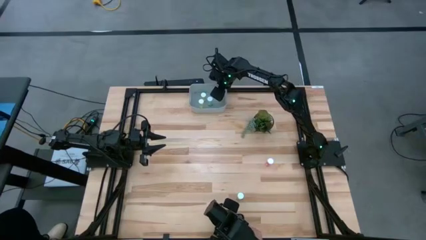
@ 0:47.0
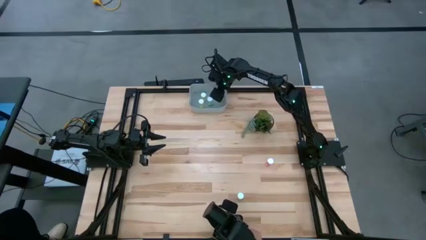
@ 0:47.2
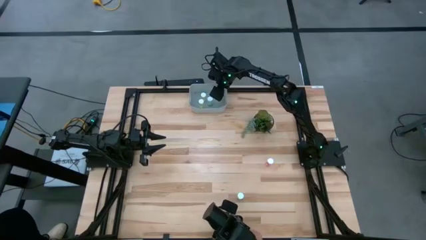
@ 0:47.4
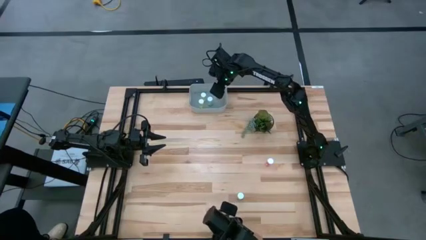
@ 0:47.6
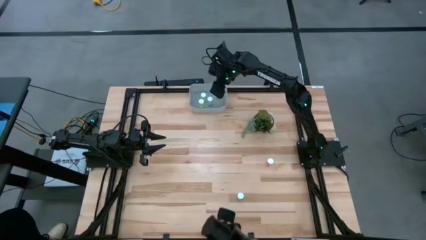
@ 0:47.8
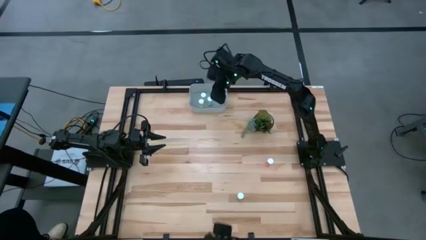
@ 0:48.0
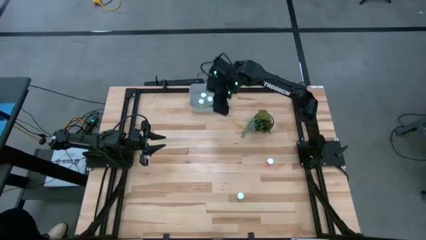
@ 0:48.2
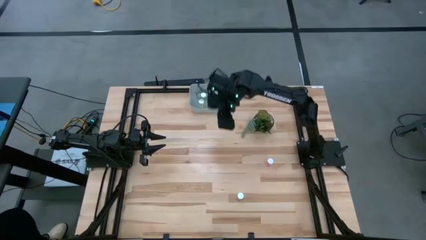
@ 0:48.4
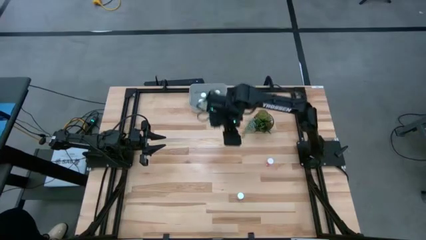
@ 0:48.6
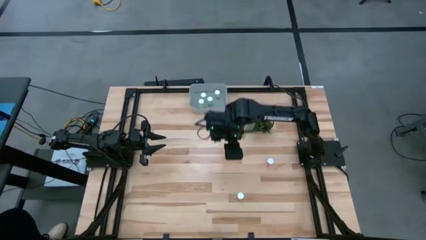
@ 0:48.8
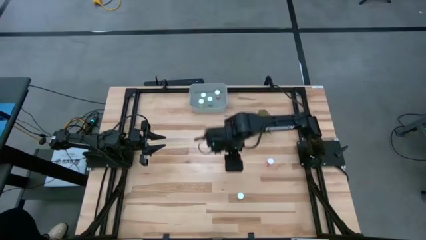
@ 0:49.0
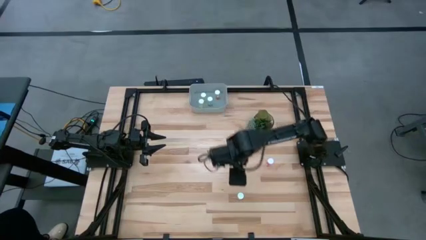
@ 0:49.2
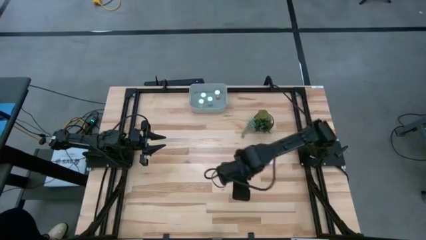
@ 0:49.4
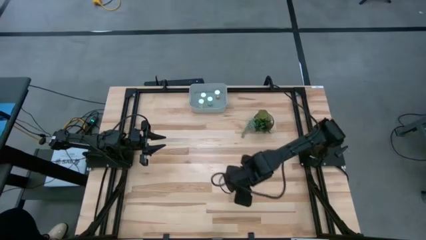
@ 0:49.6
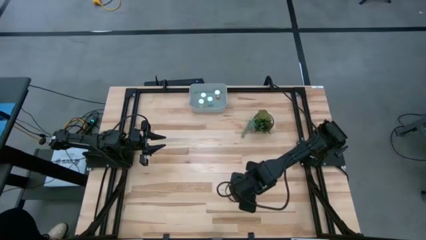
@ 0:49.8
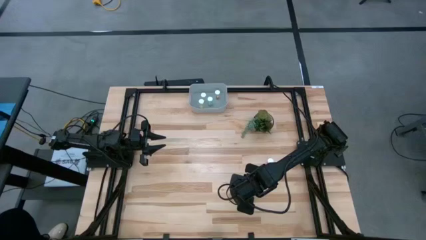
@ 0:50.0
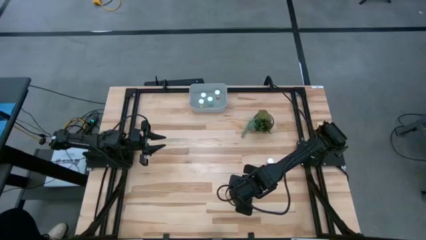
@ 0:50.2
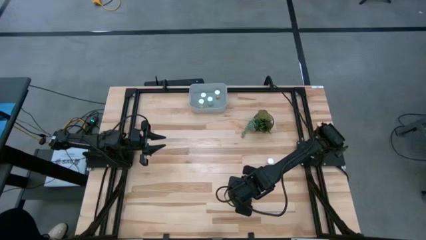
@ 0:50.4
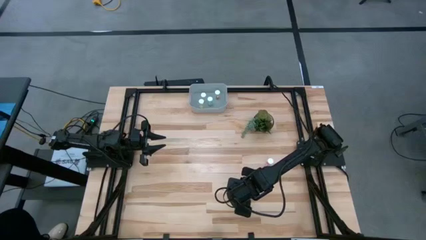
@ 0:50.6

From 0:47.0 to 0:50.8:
Task: Pick and place pill bottles into a basket
Put the blue medicine bottle in the gray bin

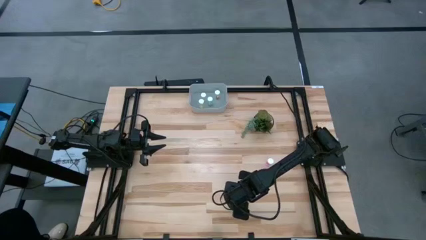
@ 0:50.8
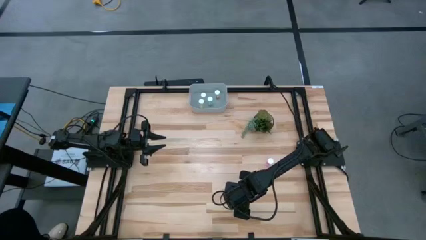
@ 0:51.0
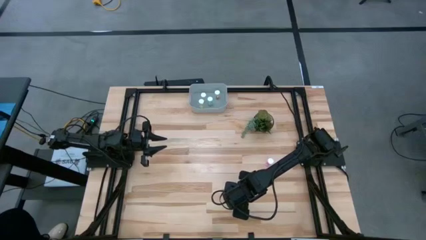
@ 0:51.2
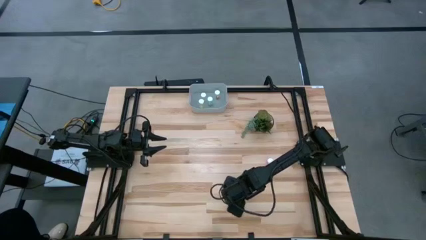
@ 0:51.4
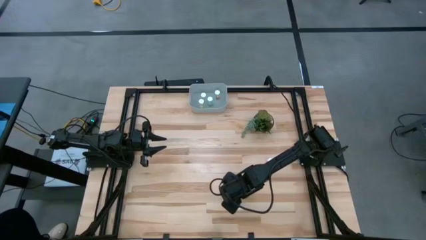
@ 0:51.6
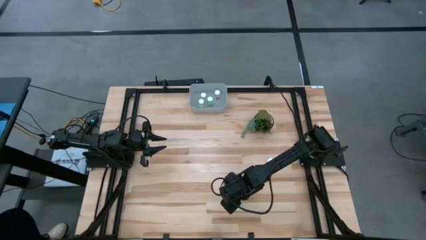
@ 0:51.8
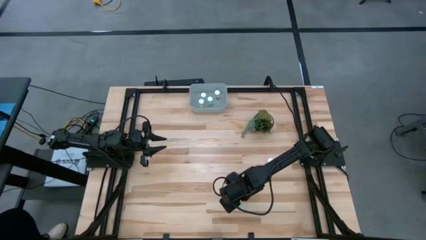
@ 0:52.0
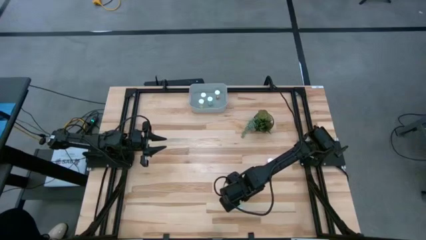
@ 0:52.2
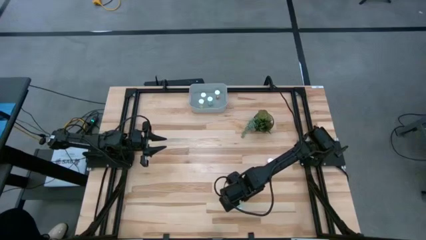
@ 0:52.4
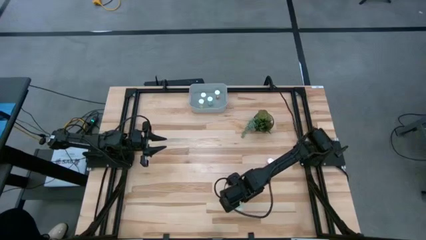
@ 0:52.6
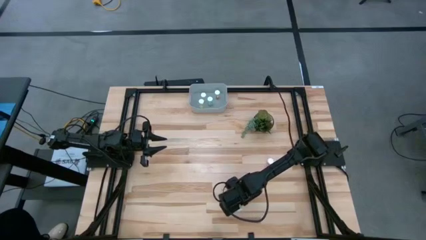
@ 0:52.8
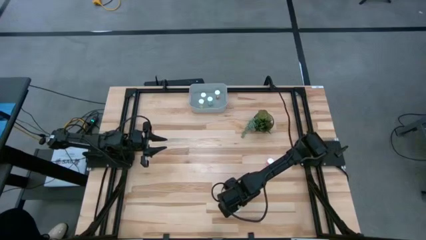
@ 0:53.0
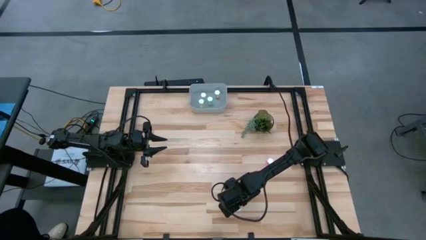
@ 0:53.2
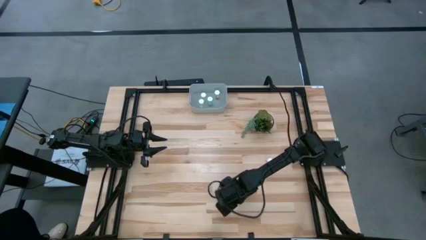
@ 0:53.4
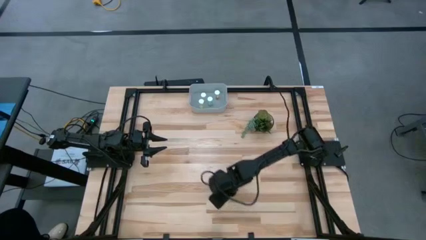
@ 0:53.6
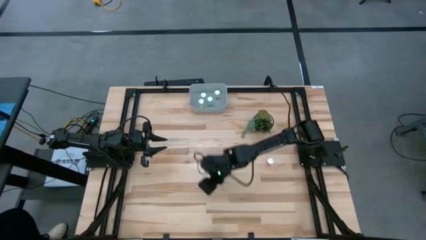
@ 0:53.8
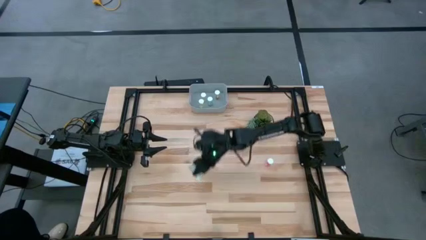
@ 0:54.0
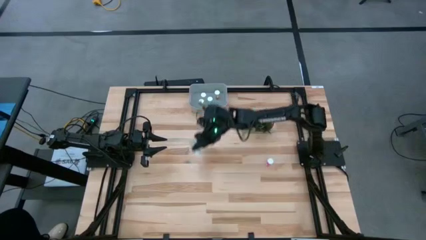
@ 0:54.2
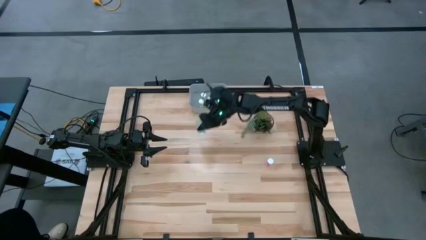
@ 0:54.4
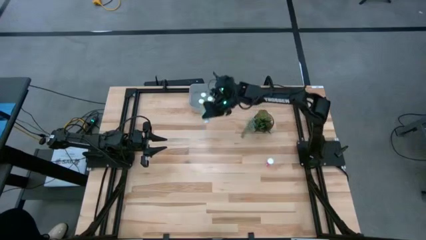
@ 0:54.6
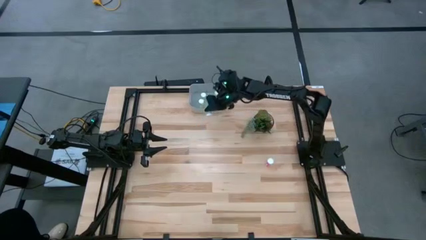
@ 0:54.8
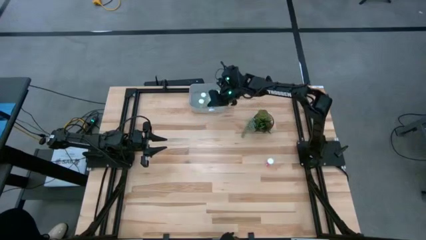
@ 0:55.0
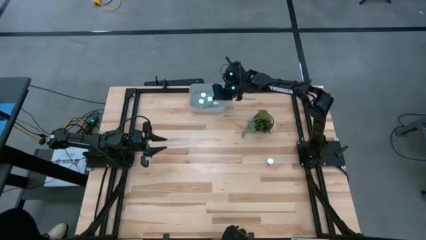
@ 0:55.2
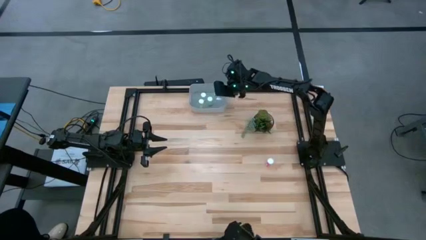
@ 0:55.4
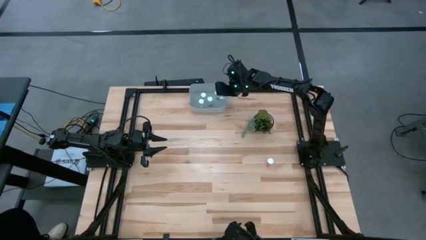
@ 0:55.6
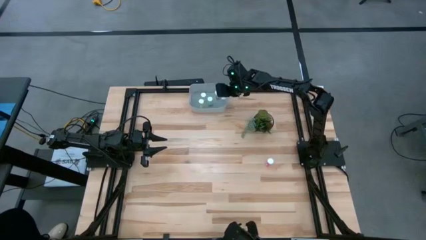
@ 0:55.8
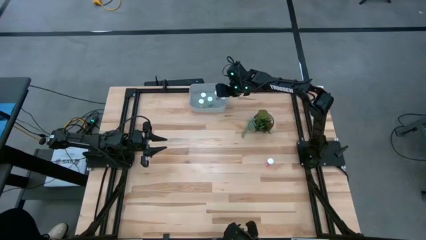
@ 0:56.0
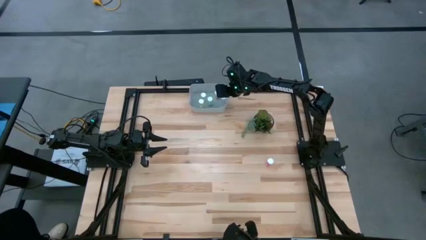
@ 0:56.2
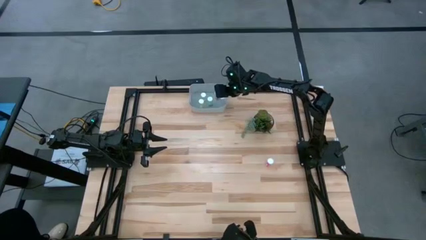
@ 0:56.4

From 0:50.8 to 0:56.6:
Put the blue medicine bottle in the gray bin

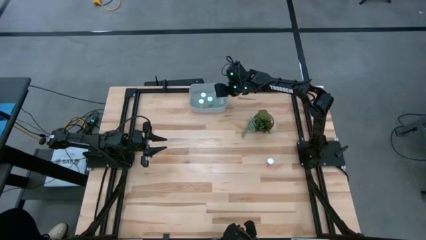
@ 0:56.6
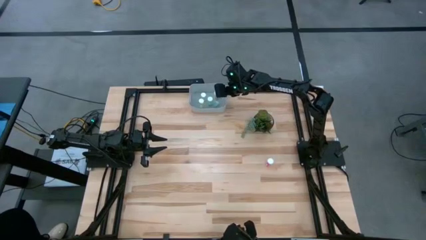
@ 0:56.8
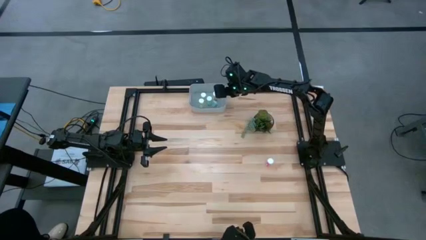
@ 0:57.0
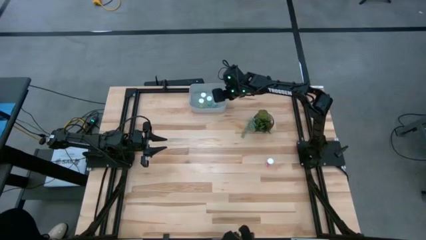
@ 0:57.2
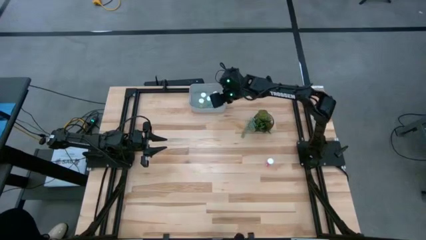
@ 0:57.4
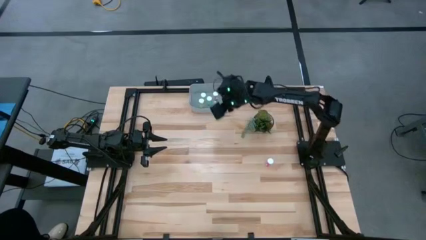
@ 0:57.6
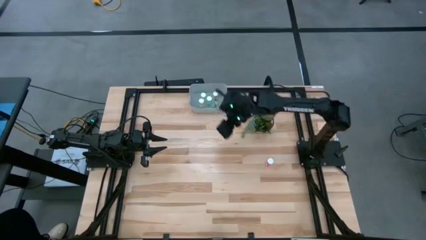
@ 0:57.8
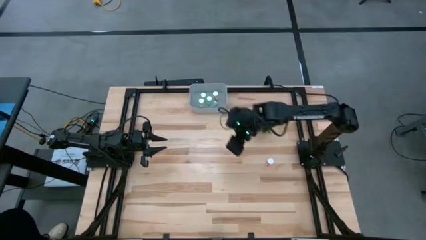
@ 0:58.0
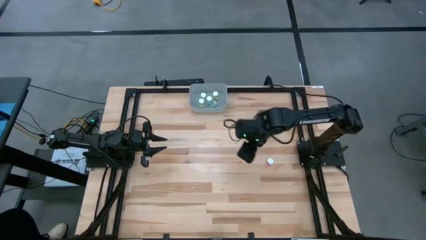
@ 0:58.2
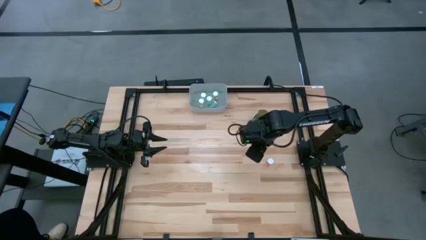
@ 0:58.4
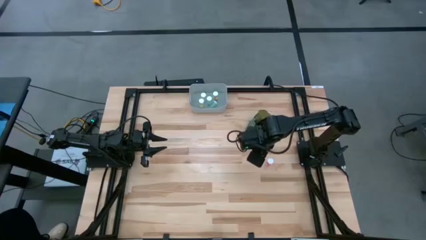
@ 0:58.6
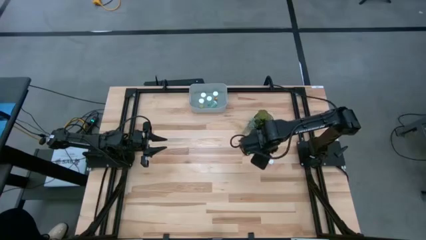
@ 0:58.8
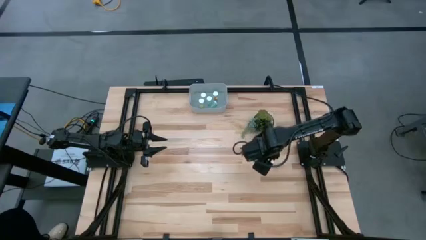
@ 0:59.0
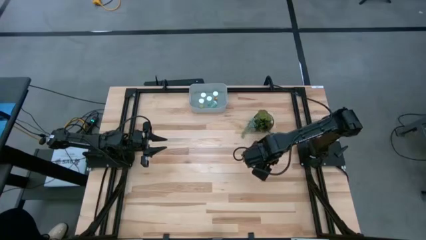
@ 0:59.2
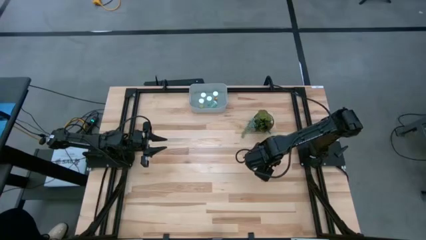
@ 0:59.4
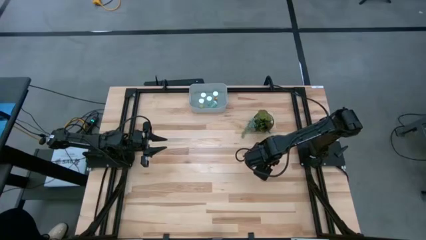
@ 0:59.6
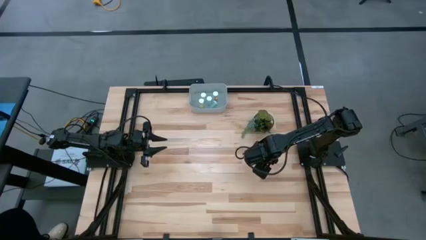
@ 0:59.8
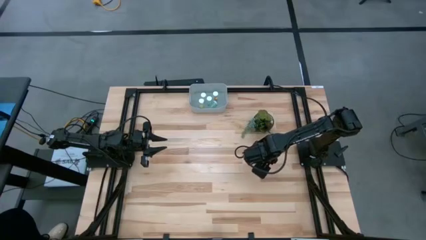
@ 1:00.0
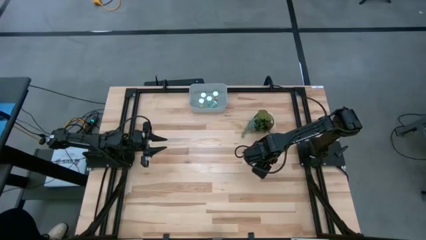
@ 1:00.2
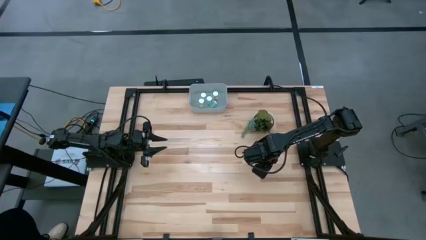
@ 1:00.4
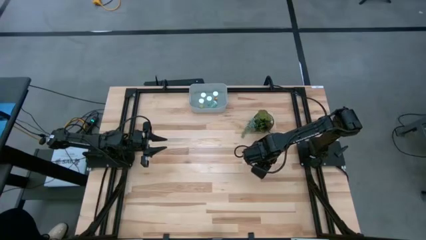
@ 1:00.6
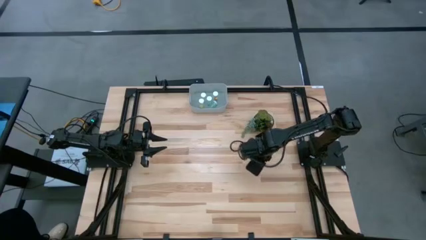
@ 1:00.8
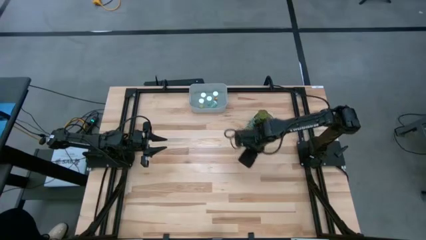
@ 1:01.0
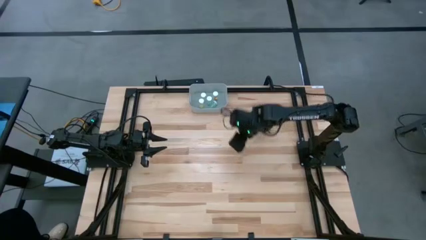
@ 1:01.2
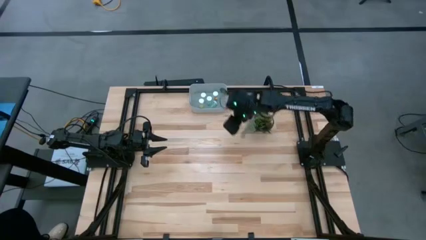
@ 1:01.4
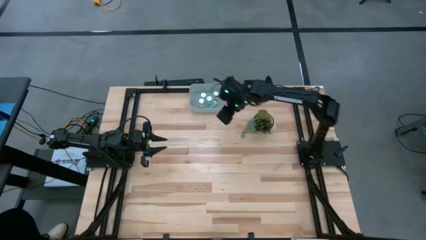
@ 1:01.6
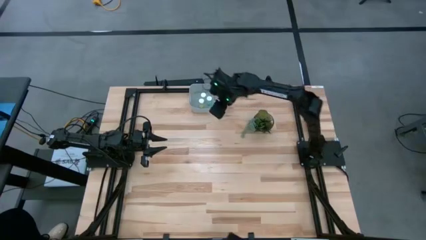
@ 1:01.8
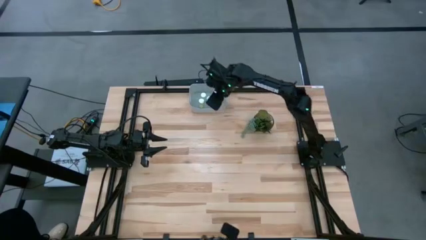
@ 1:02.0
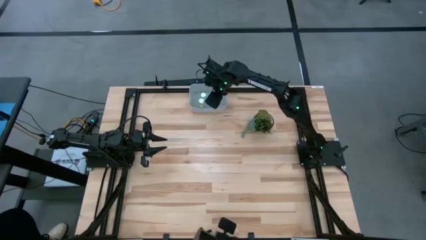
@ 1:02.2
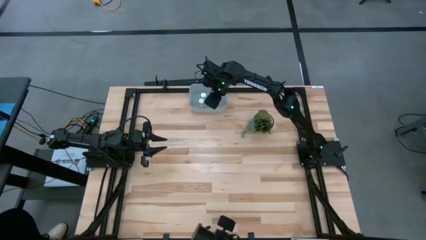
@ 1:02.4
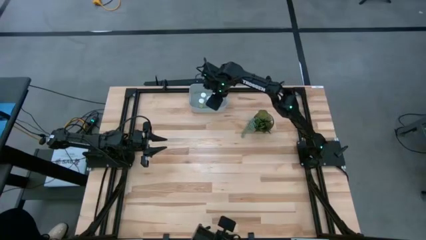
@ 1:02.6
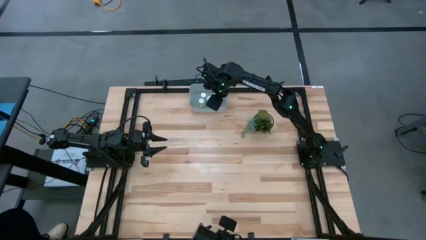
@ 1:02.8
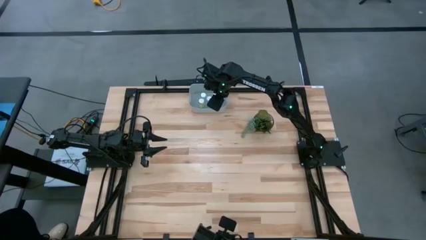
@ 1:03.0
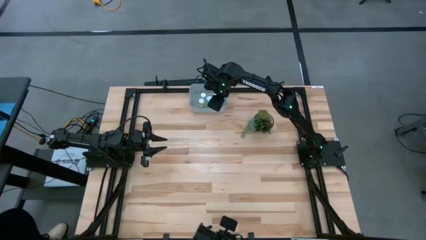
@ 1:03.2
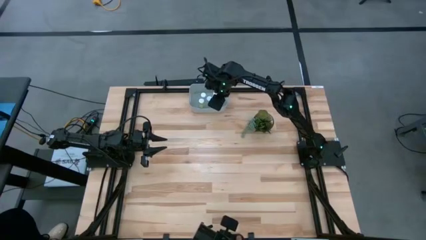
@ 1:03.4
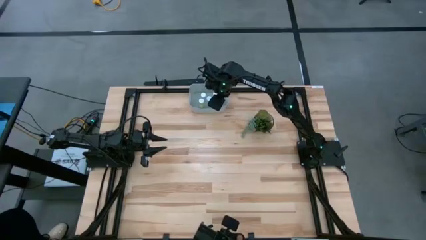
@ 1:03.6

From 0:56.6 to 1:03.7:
Put the pink medicine bottle in the gray bin
